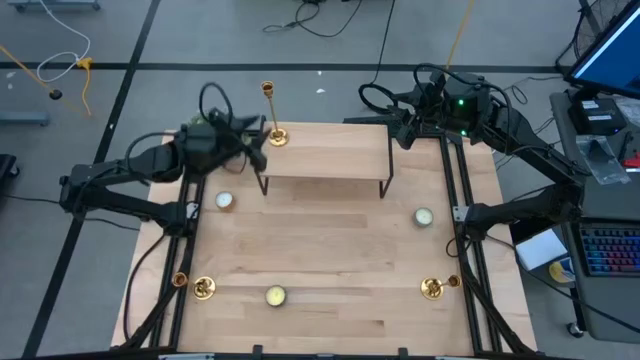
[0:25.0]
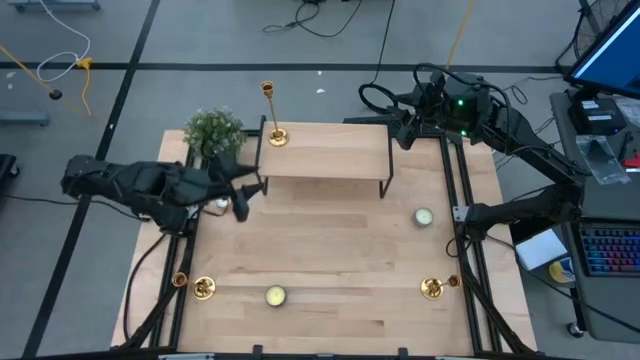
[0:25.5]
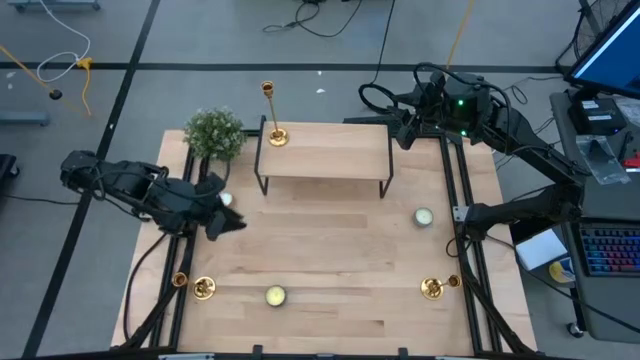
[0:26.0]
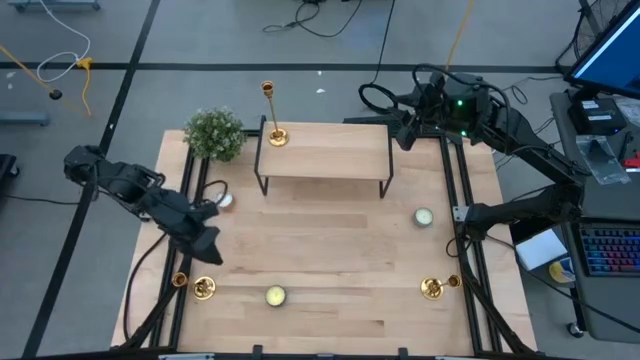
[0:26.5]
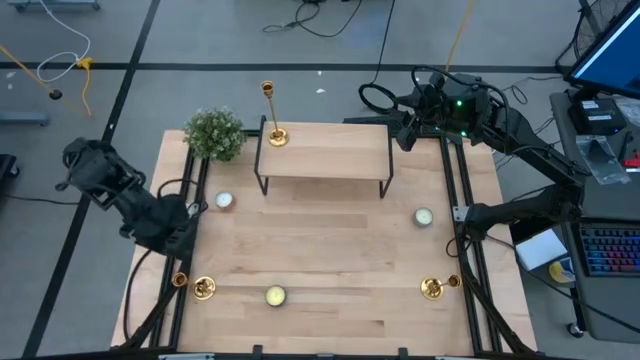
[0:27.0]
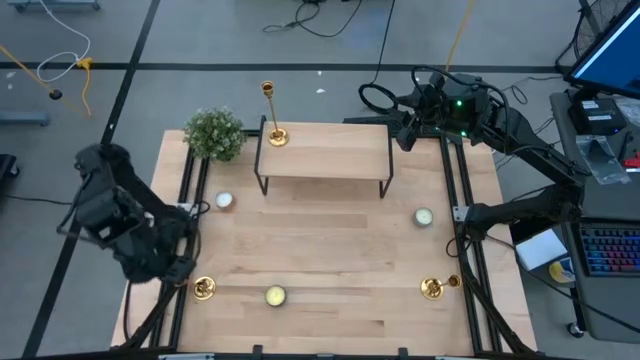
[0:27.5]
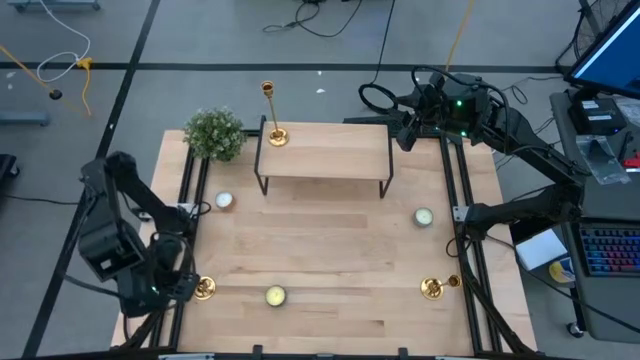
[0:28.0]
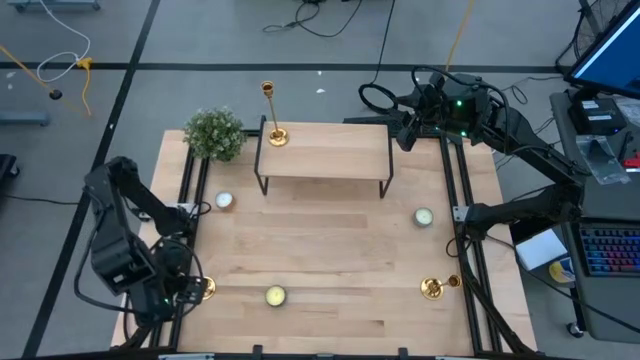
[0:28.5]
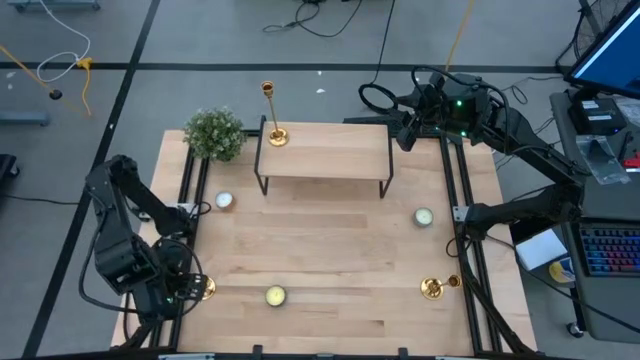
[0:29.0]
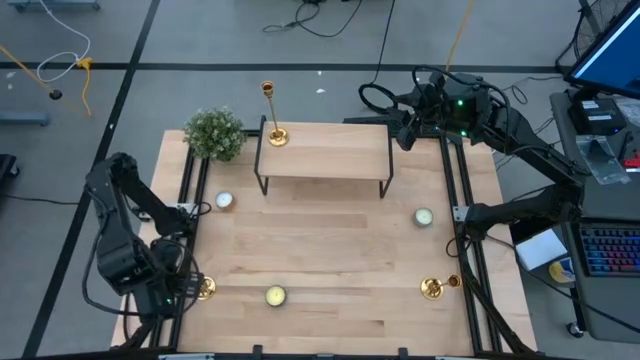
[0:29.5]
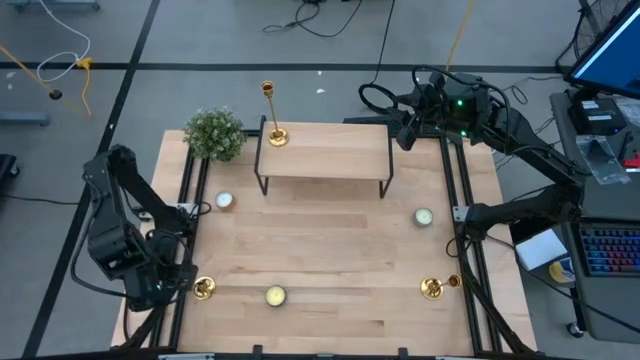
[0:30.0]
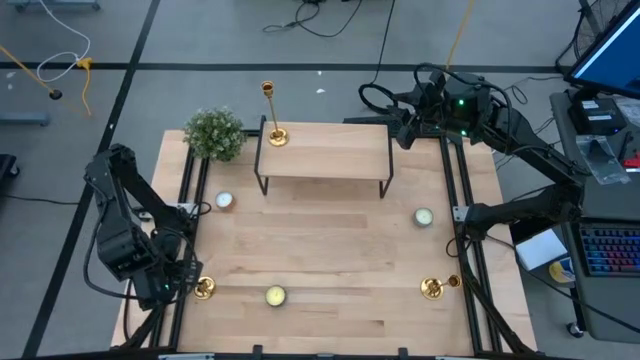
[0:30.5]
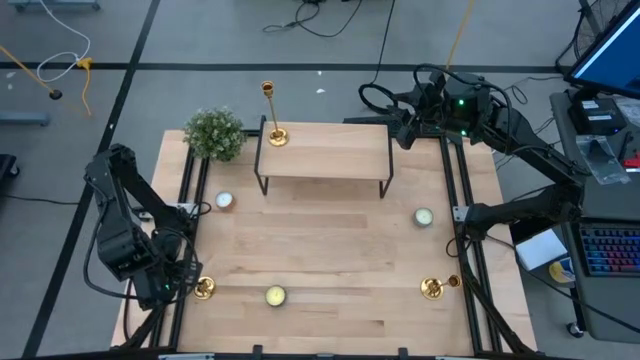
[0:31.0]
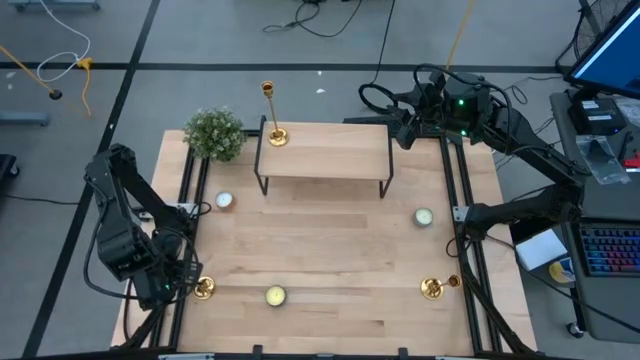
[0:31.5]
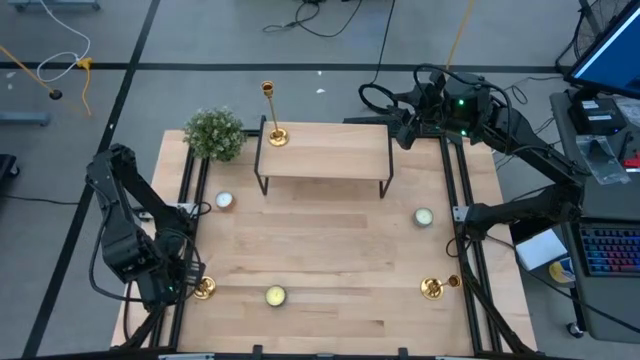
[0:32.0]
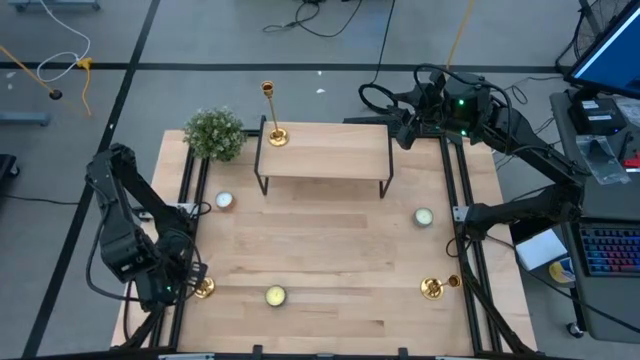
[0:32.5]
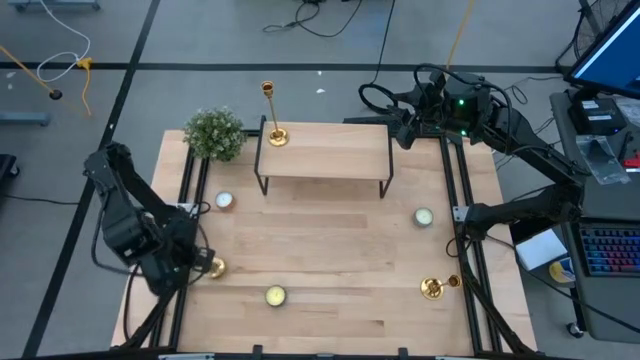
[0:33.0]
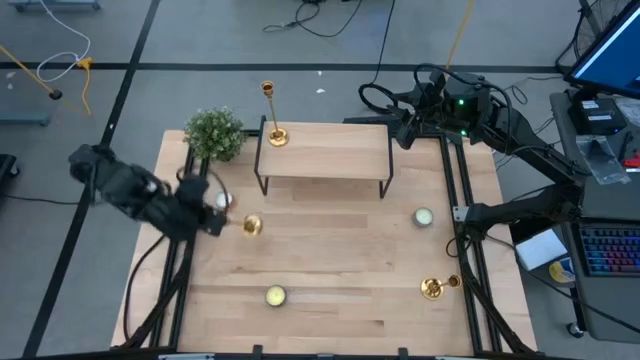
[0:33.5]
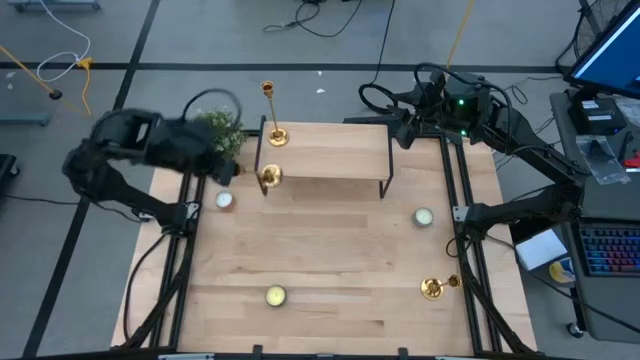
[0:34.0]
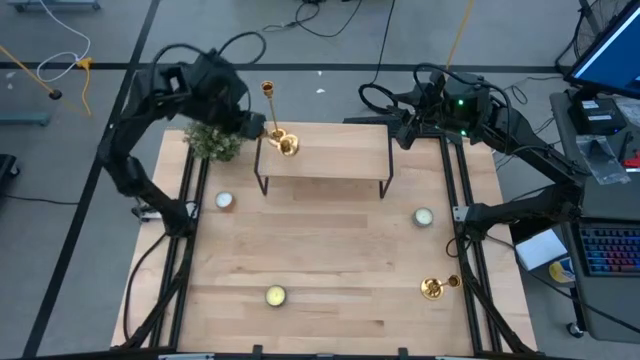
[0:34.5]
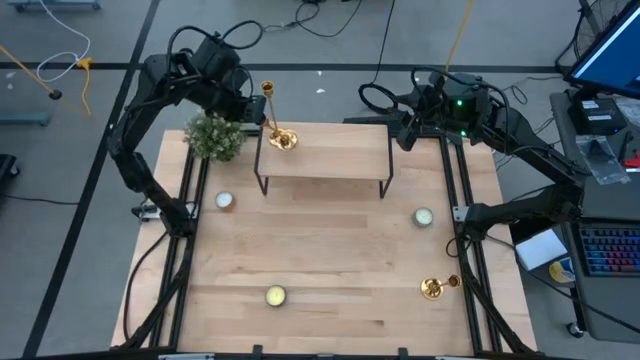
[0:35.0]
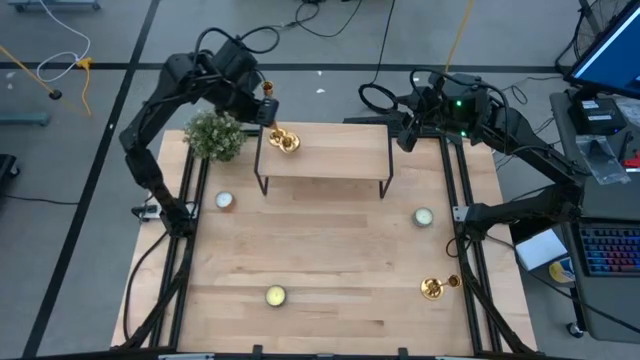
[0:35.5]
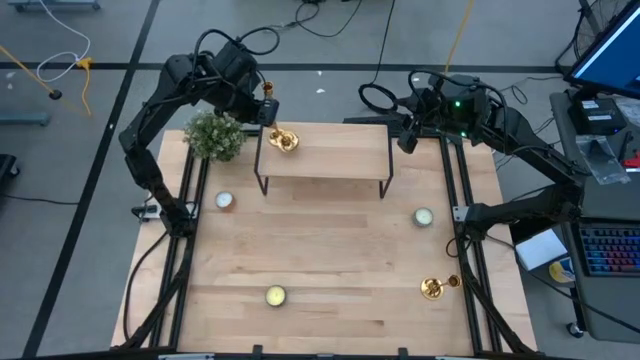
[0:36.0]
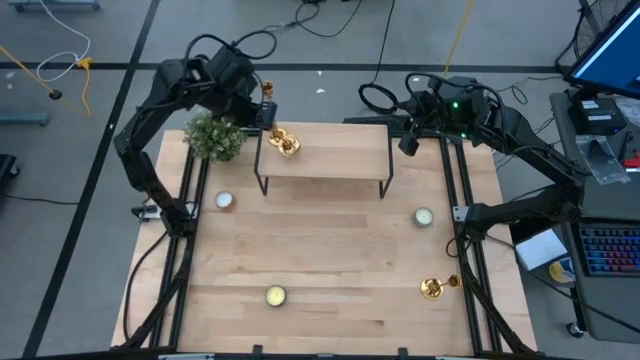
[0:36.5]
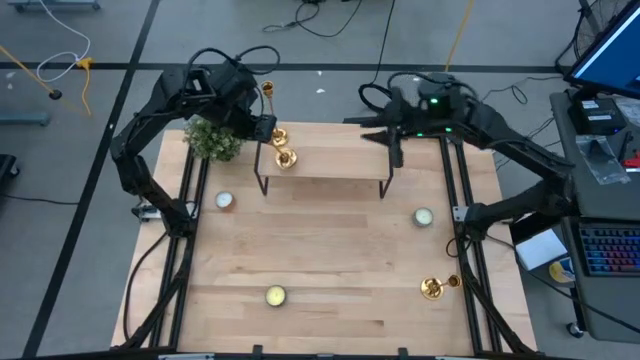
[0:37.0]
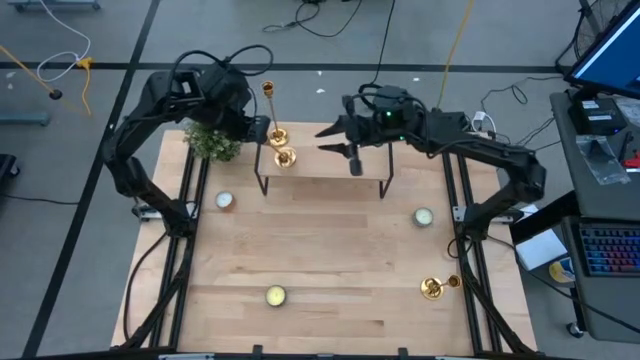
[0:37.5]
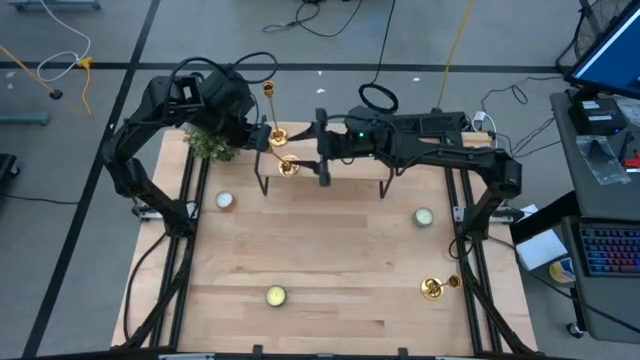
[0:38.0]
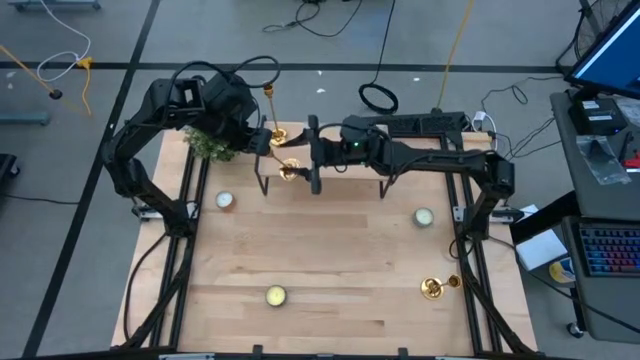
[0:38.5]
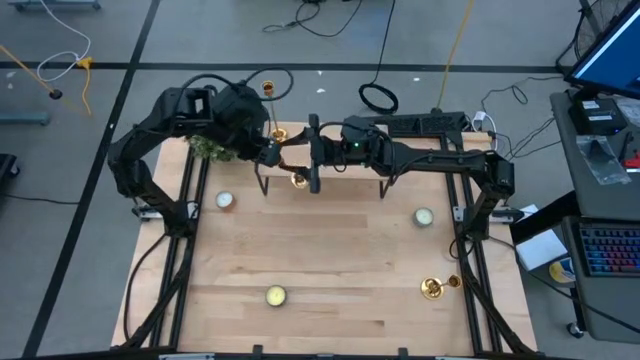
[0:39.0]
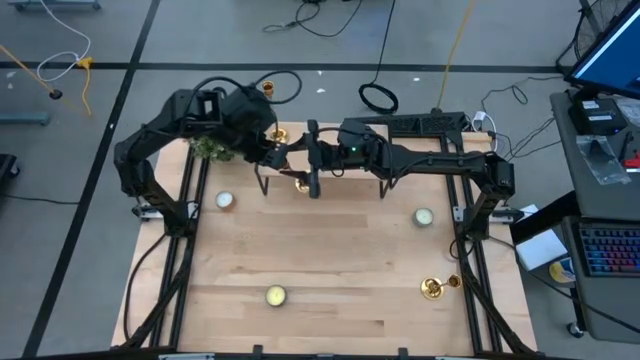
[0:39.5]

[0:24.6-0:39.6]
Task: Pick & Place candle stick holders
Put the left gold candle holder on the shelf

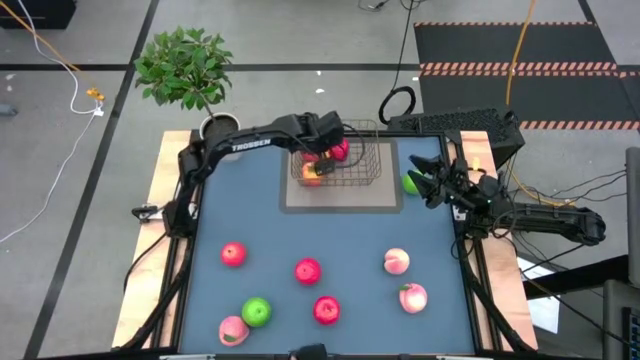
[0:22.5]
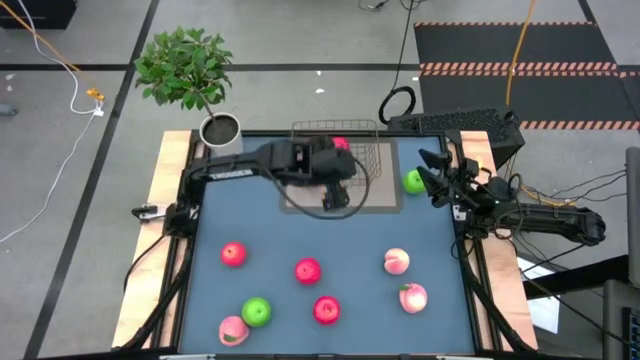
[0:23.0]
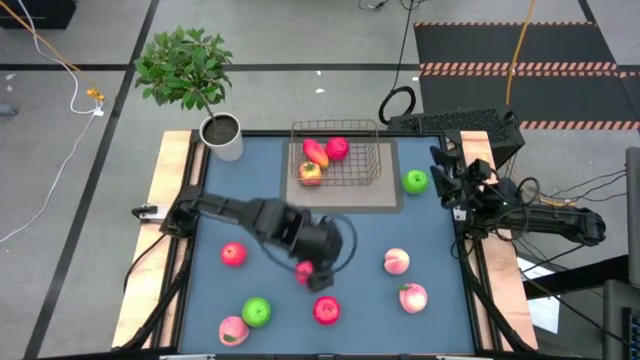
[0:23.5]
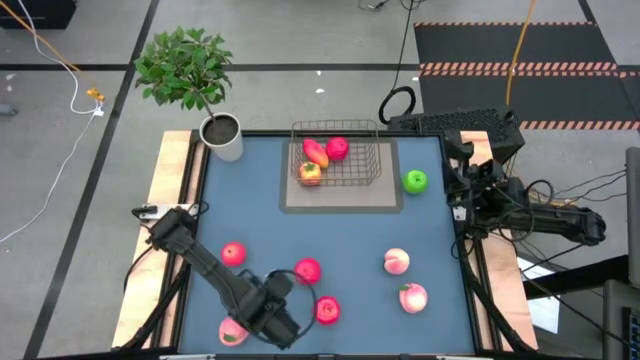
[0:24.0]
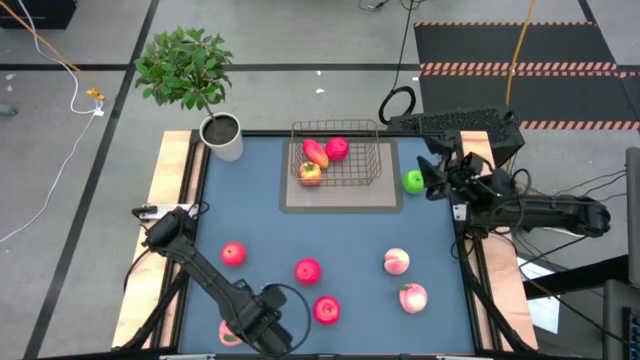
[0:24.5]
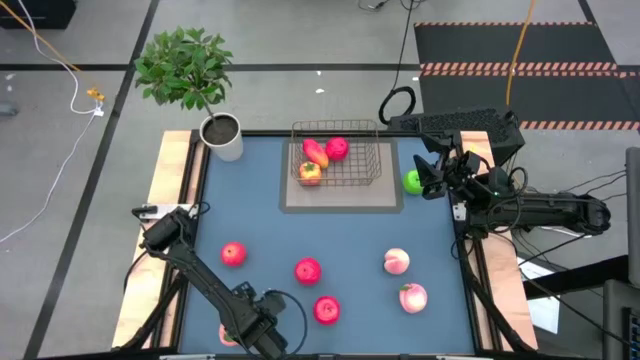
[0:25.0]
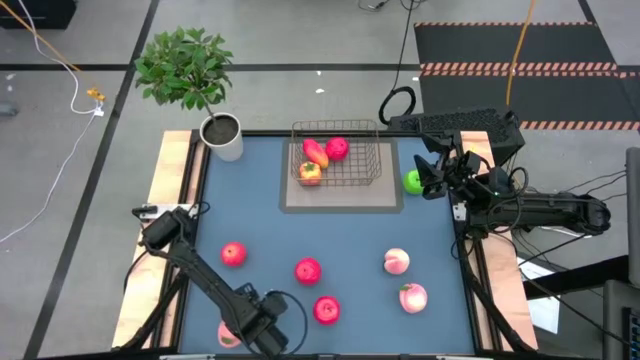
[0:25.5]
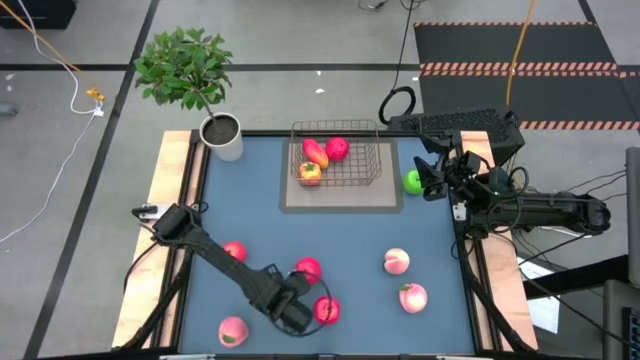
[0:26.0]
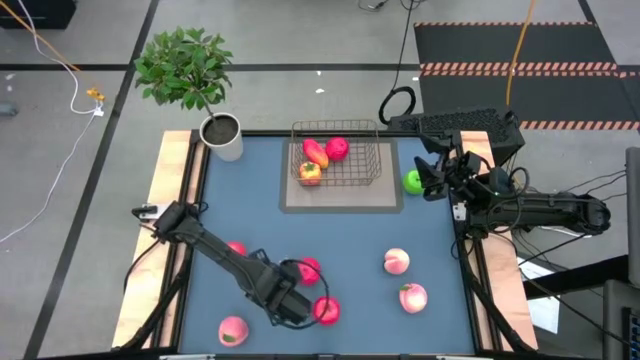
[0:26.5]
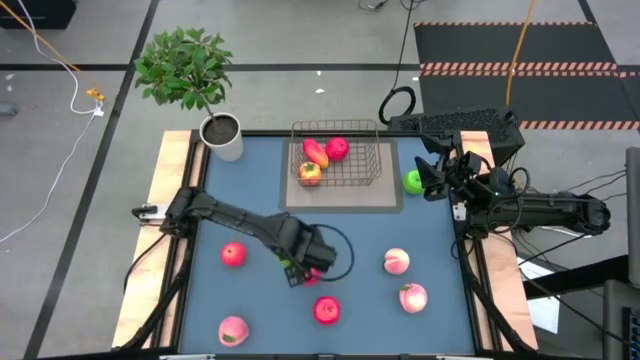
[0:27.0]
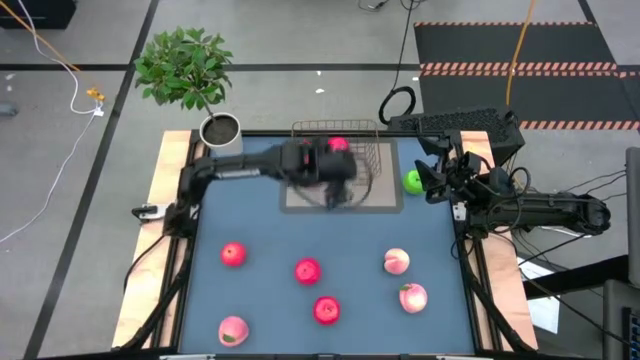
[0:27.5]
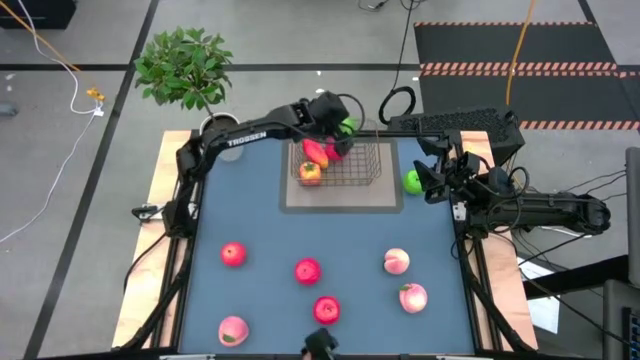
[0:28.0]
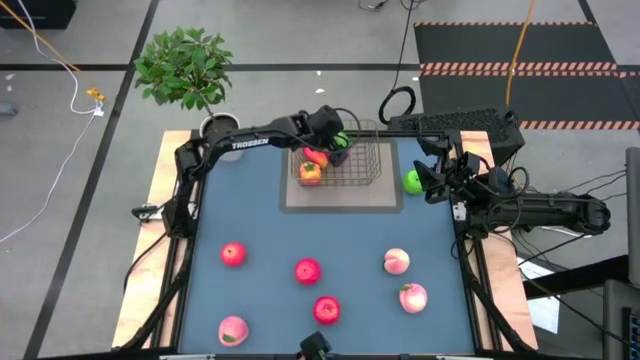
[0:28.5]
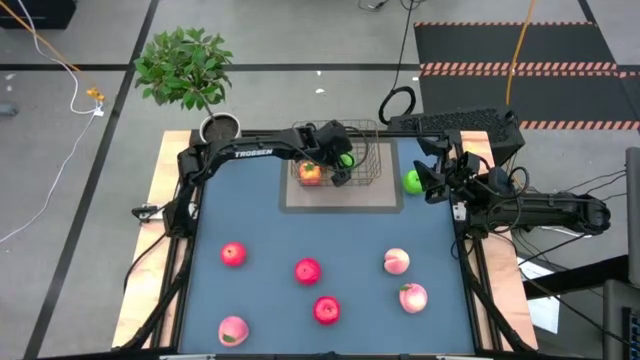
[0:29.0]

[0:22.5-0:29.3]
Task: Build produce basket
Put the green apple into the wire basket
